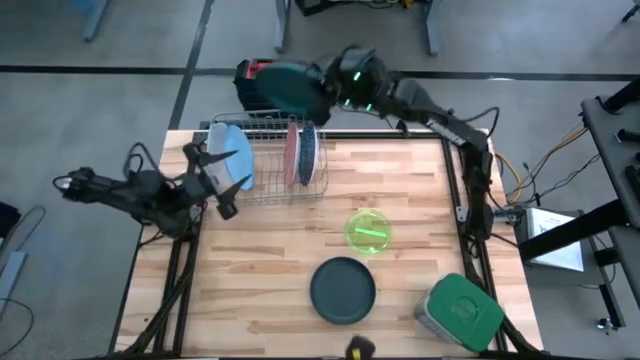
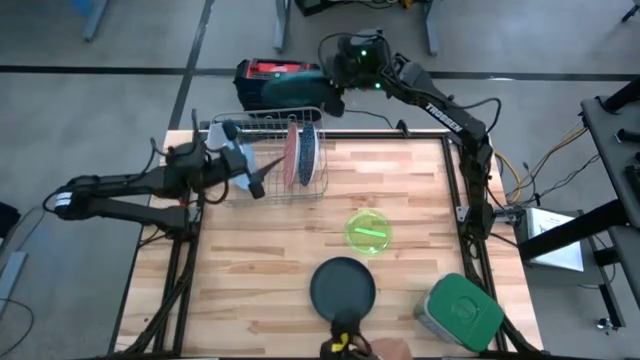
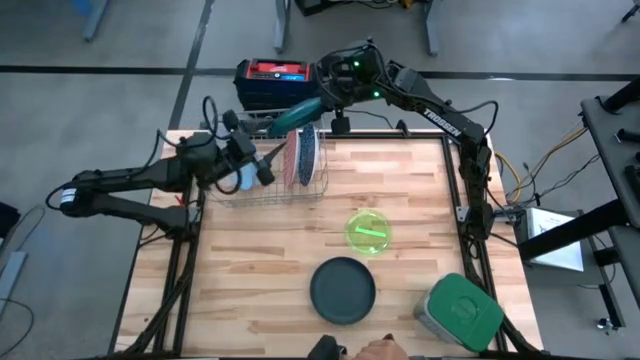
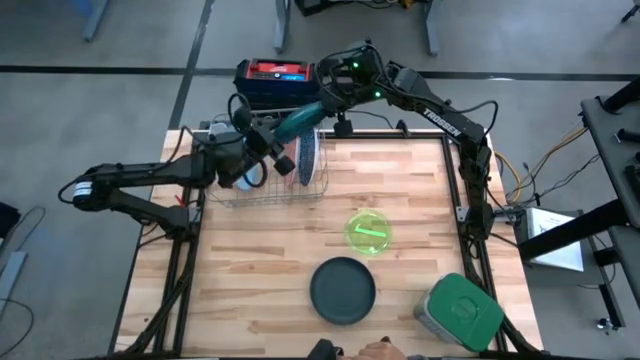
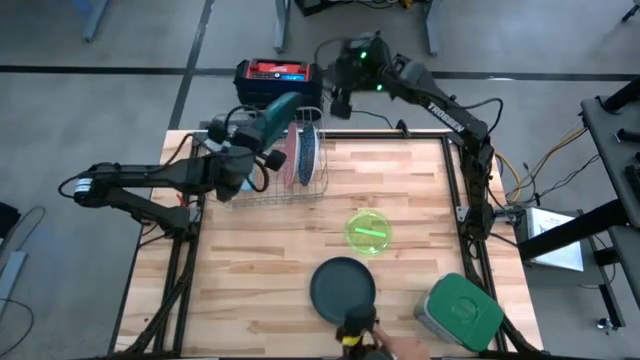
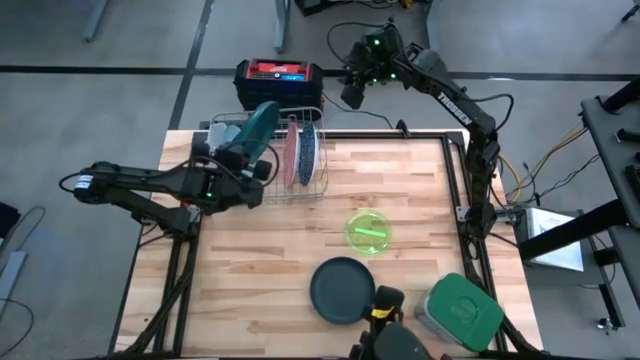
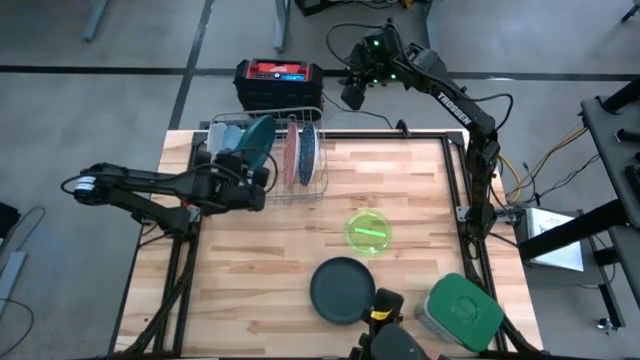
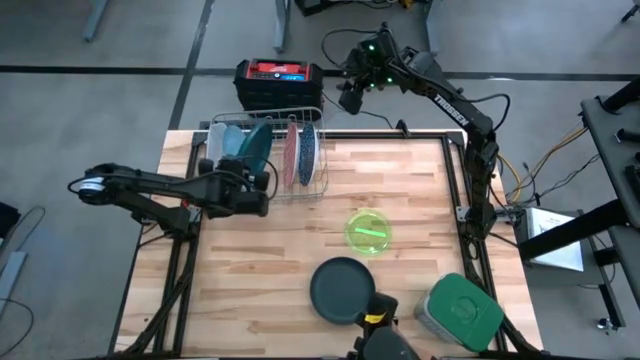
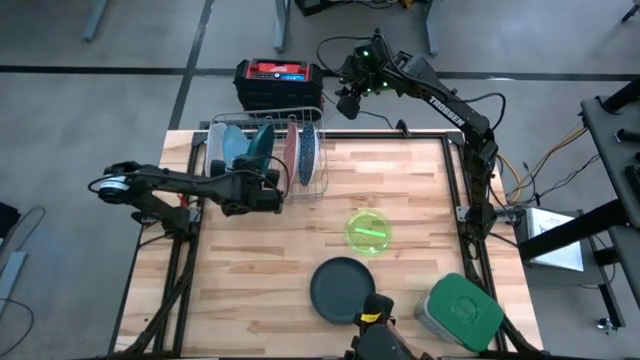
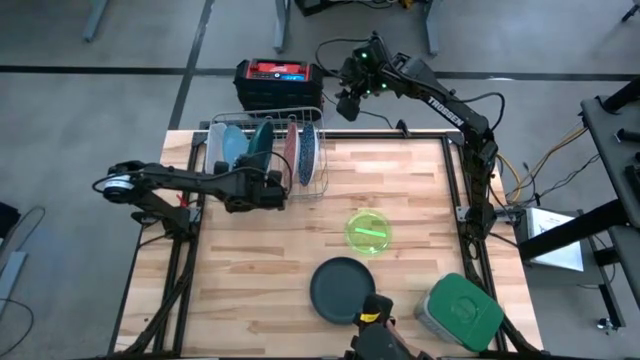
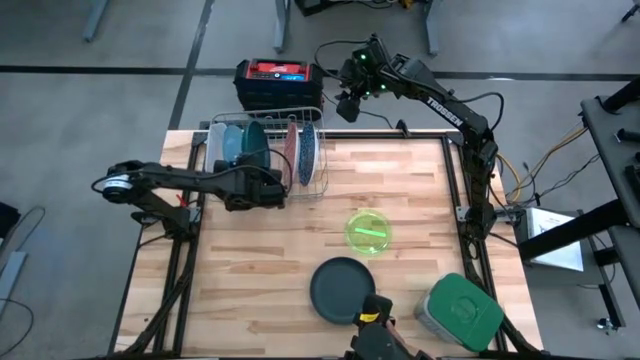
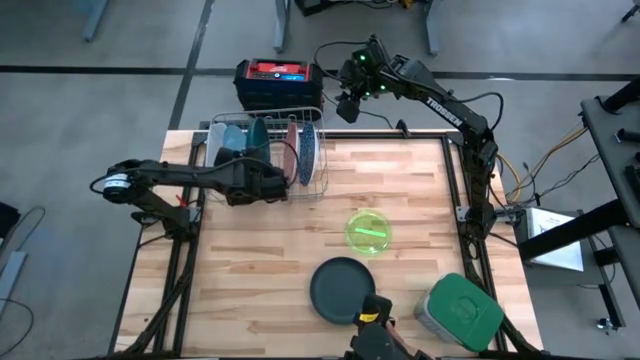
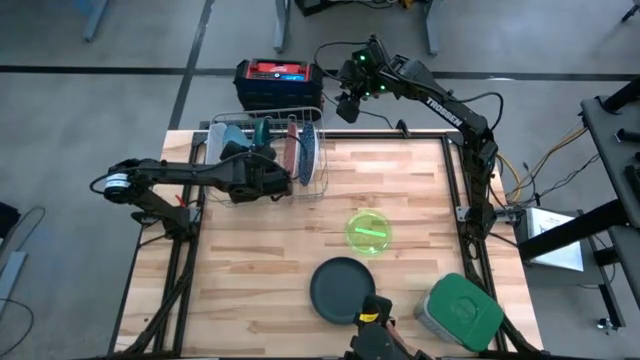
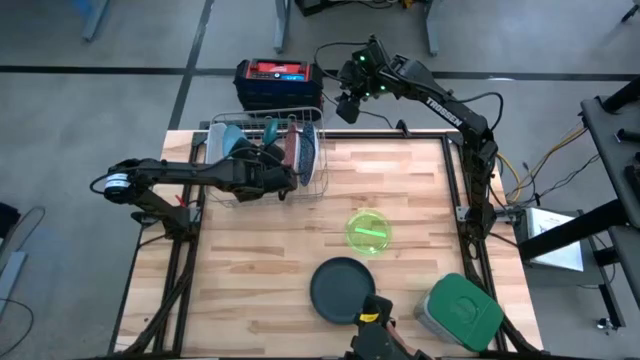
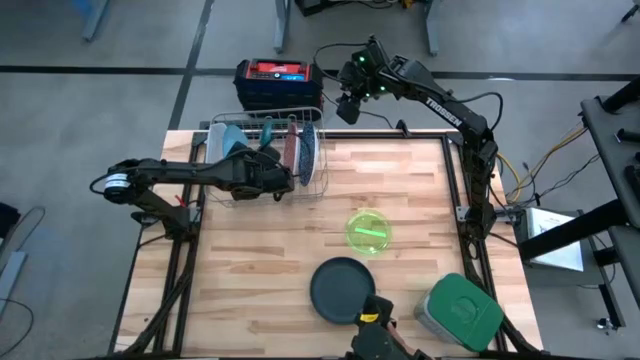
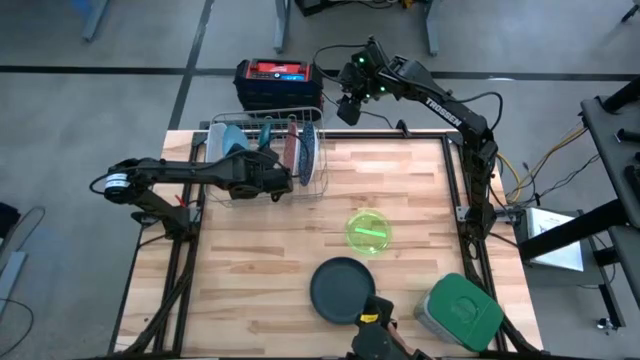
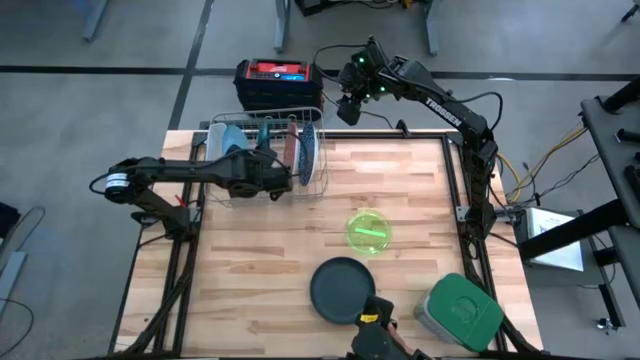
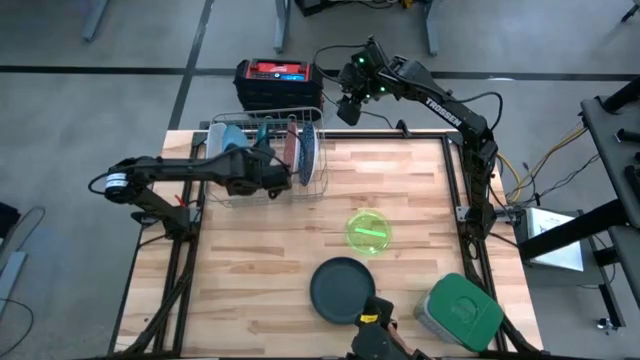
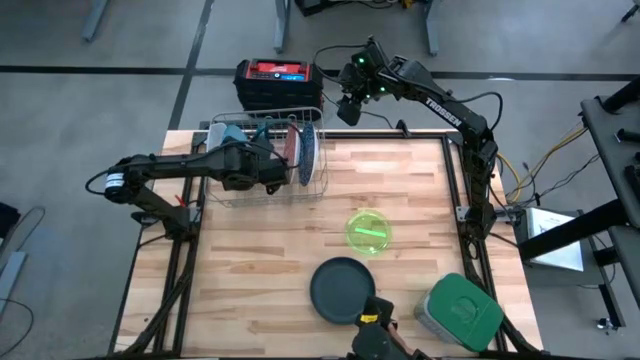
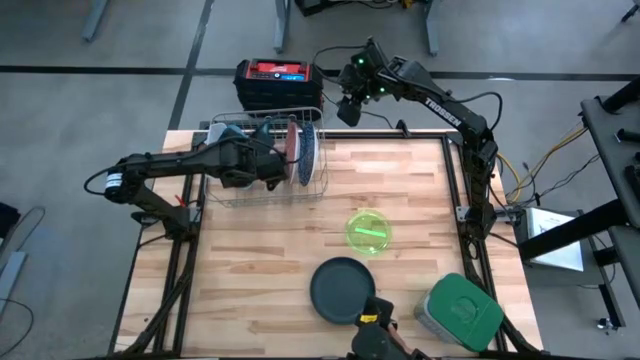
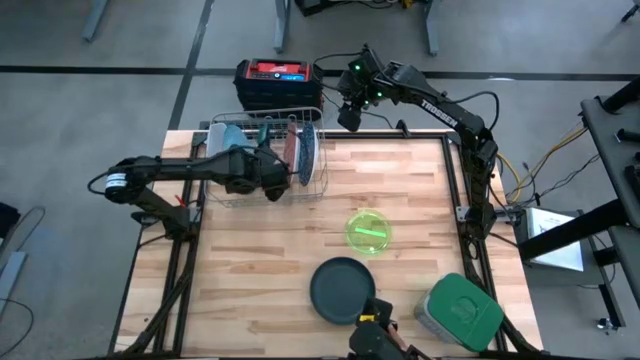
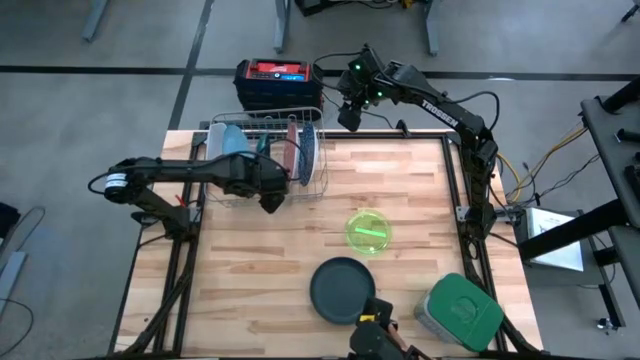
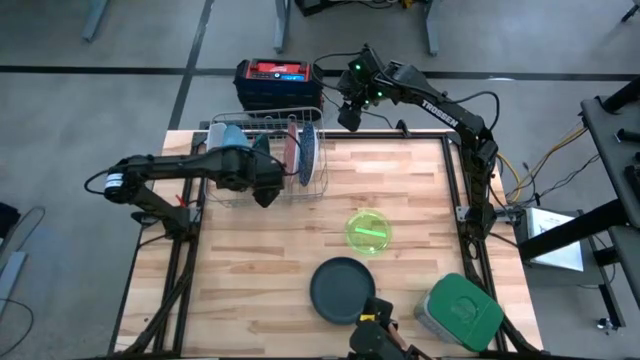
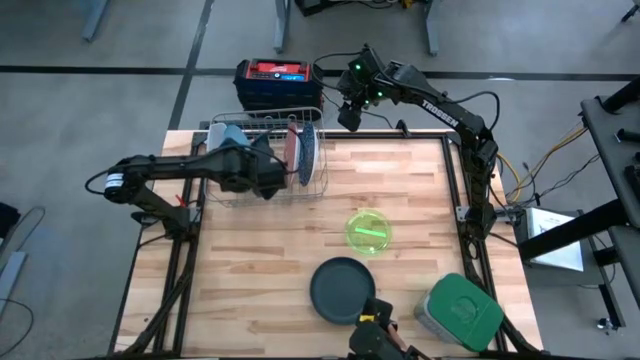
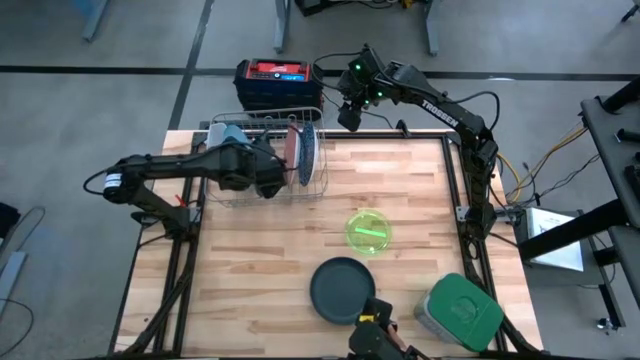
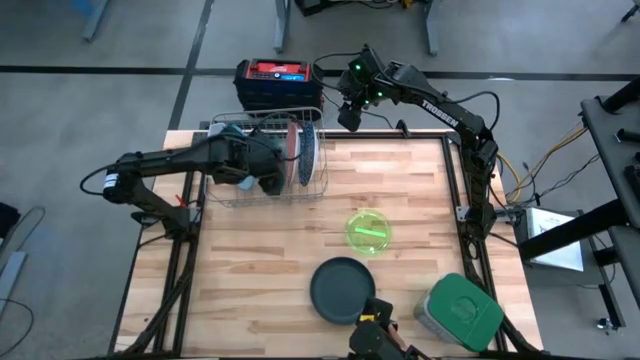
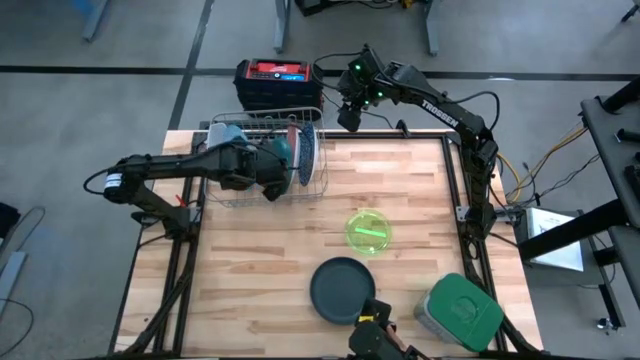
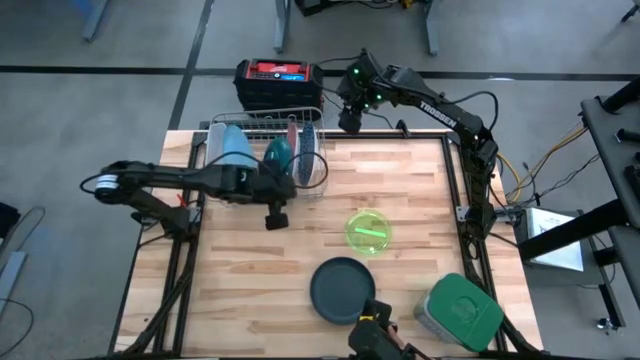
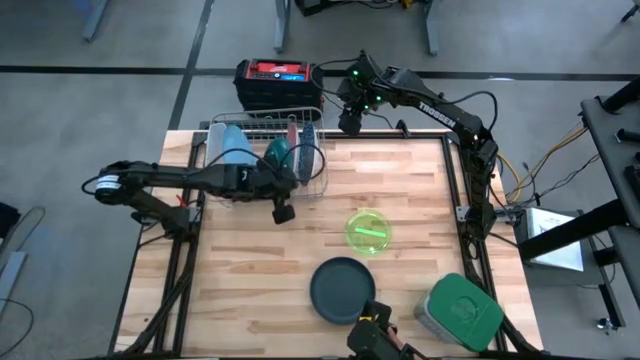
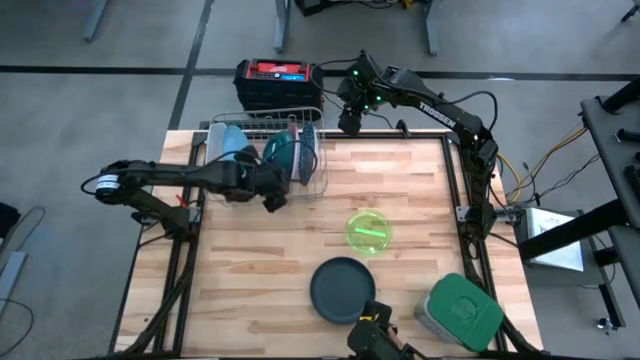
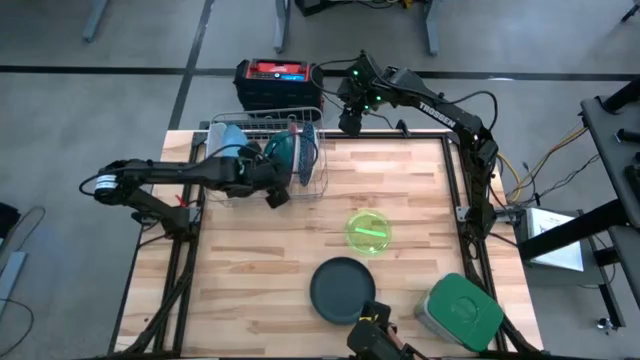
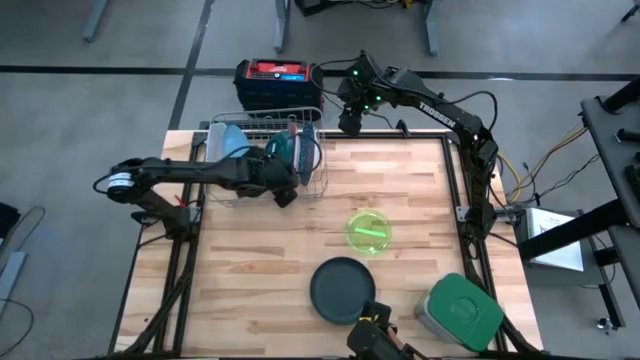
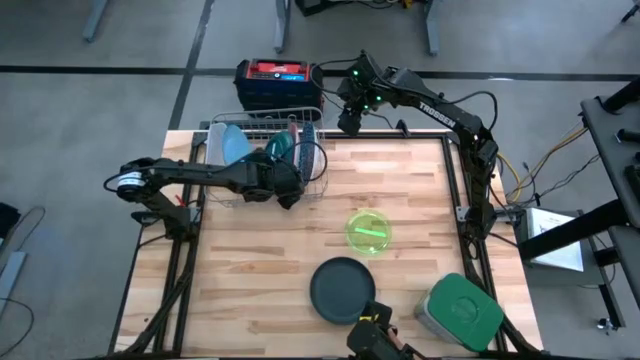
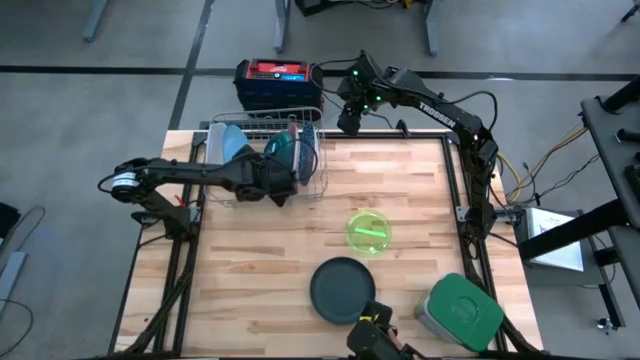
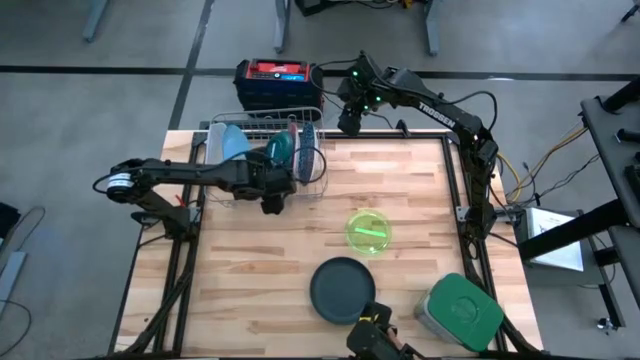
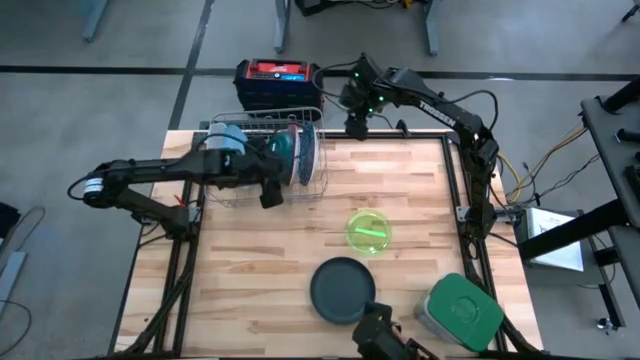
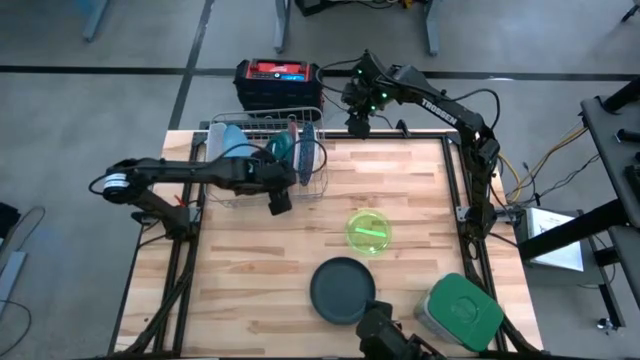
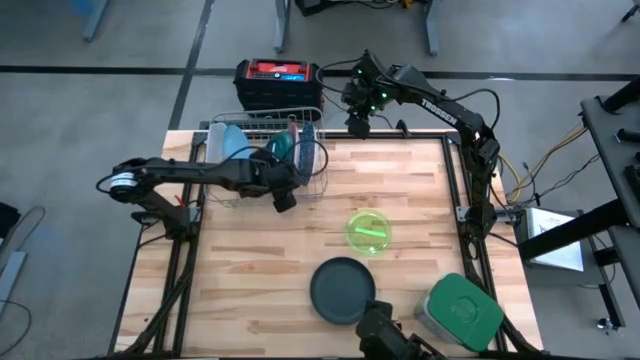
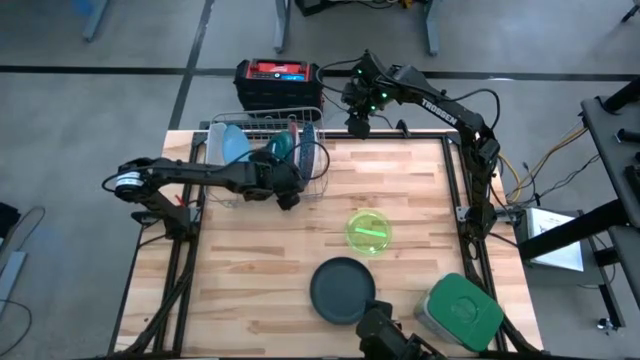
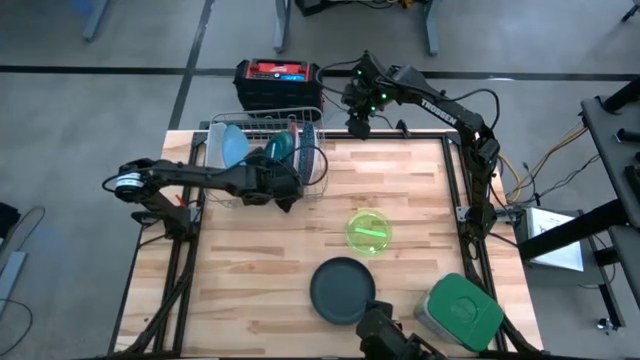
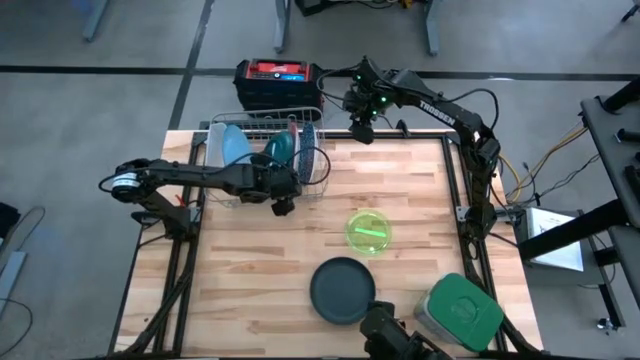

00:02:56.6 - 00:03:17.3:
Task: Sort dishes
Put the green plate into the dish rack
